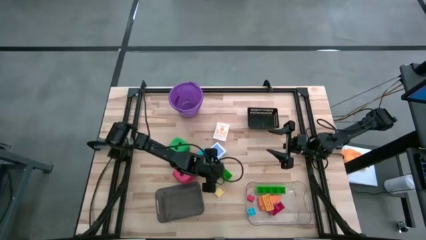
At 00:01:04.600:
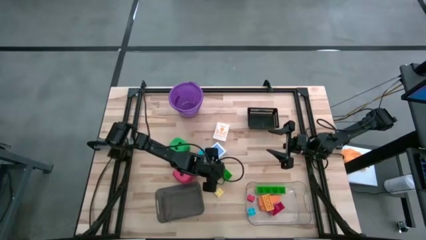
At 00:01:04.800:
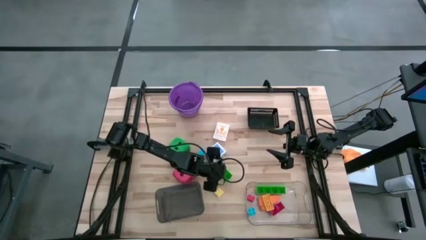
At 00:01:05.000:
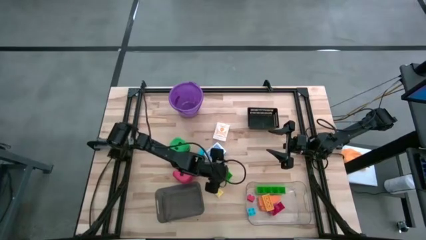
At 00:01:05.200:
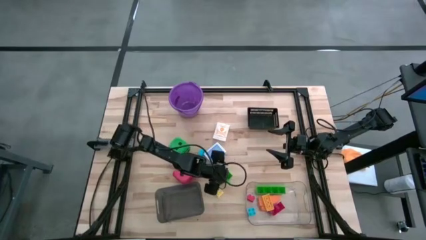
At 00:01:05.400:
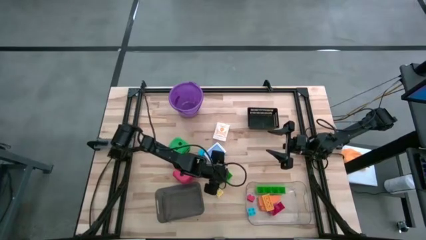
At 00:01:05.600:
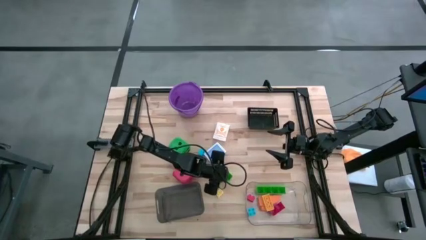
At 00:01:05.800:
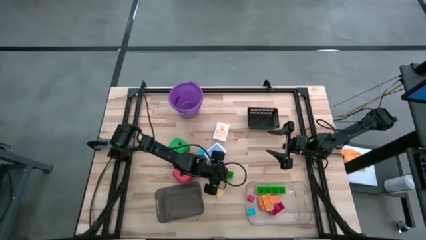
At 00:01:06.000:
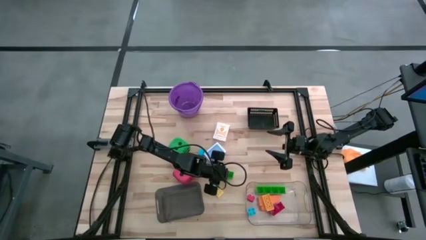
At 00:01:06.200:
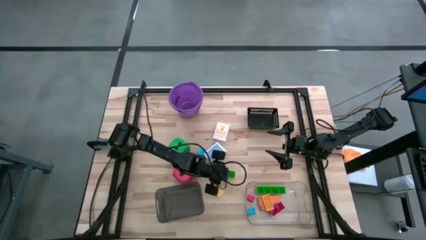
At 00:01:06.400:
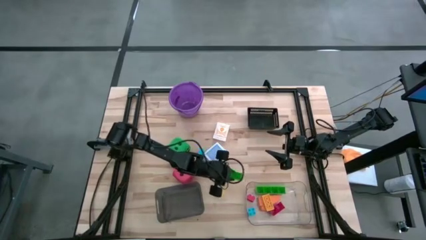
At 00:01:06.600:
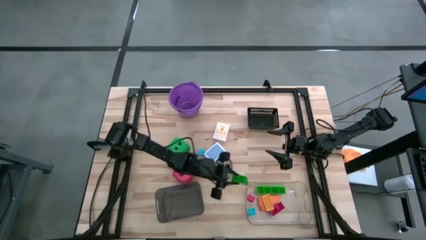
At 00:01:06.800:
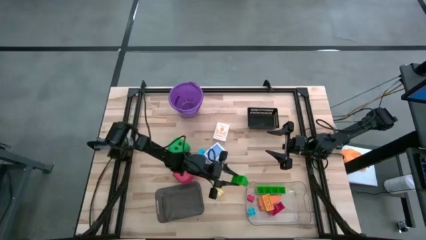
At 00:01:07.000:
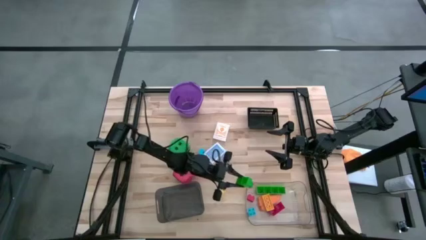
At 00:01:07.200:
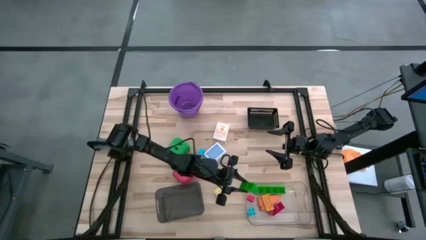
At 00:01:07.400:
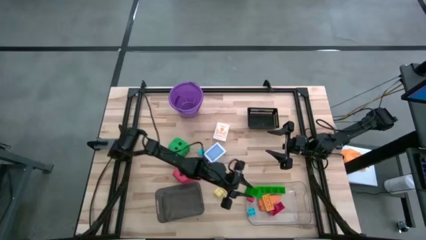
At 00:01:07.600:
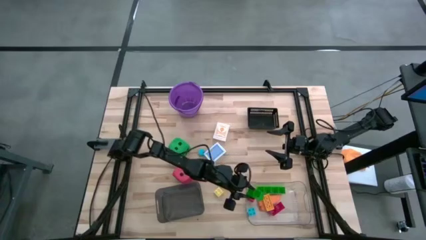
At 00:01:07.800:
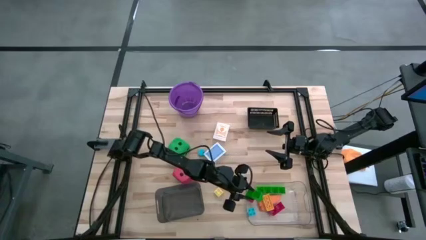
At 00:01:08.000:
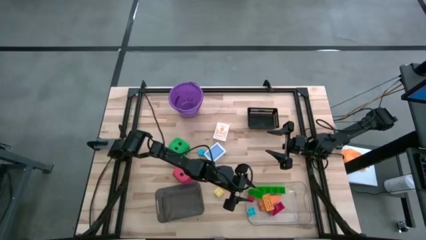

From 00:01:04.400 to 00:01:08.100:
Task: Pick & Place Toys
Put the large green game piece into the transparent bin

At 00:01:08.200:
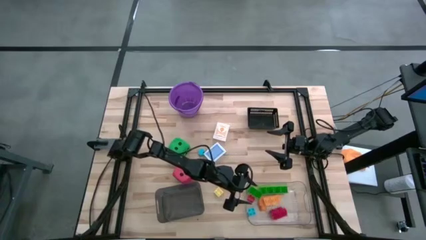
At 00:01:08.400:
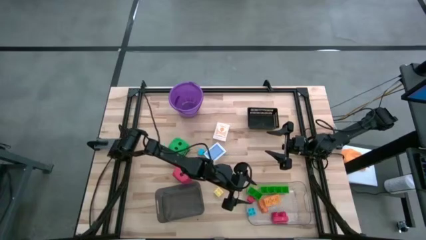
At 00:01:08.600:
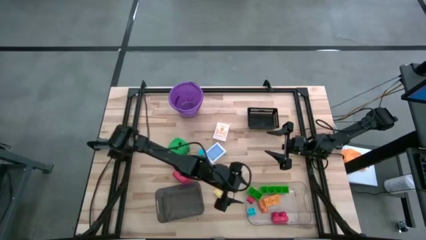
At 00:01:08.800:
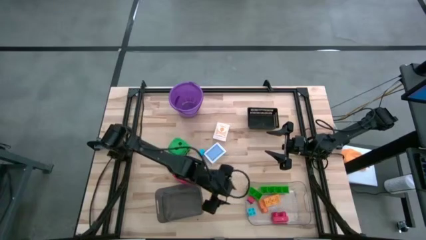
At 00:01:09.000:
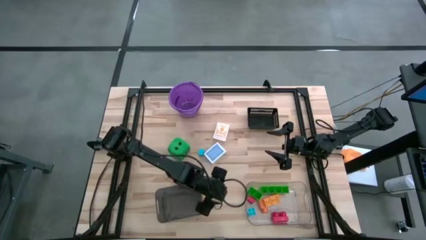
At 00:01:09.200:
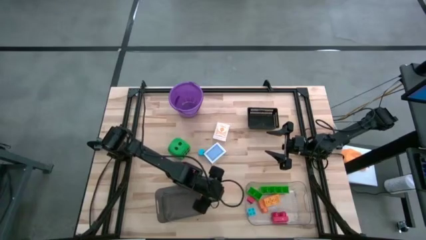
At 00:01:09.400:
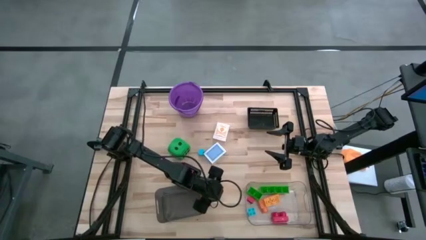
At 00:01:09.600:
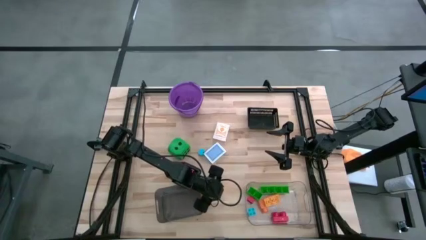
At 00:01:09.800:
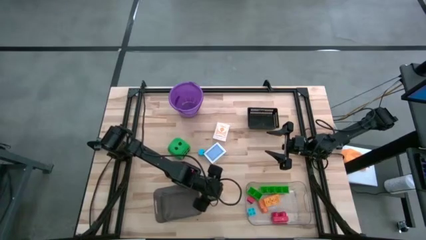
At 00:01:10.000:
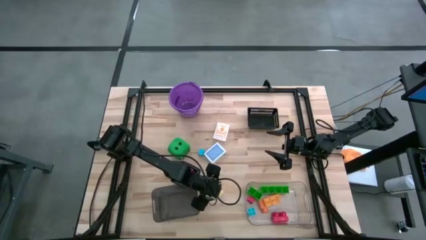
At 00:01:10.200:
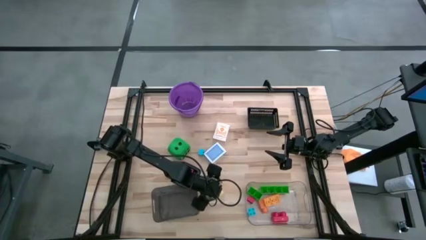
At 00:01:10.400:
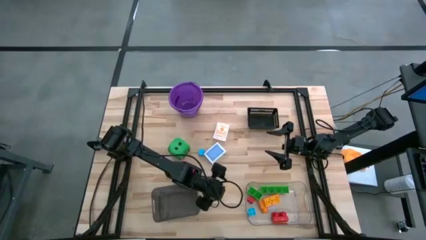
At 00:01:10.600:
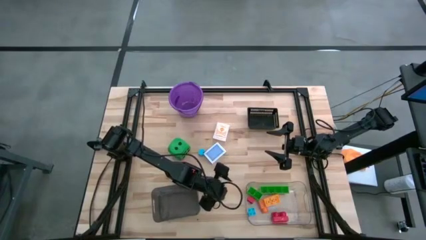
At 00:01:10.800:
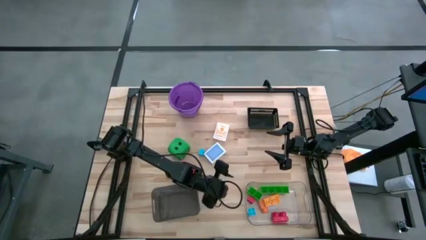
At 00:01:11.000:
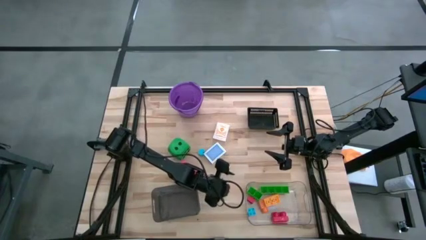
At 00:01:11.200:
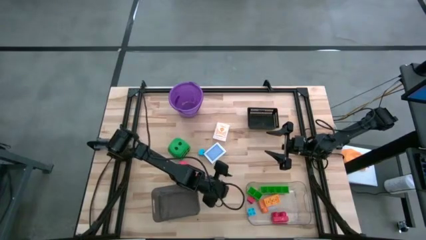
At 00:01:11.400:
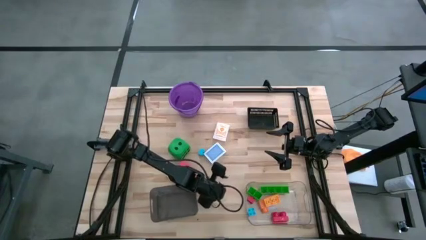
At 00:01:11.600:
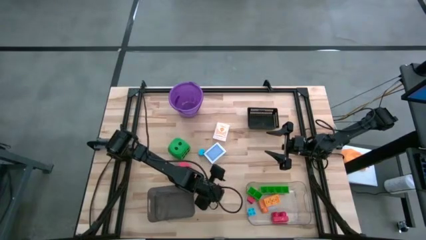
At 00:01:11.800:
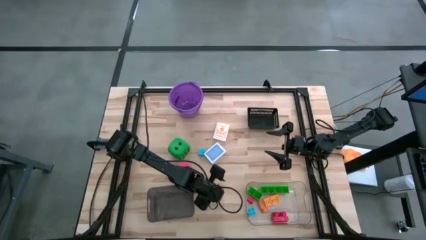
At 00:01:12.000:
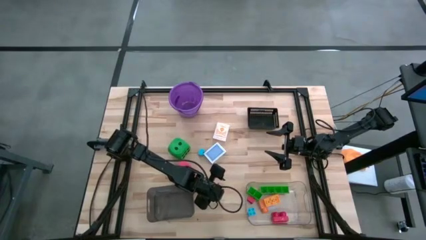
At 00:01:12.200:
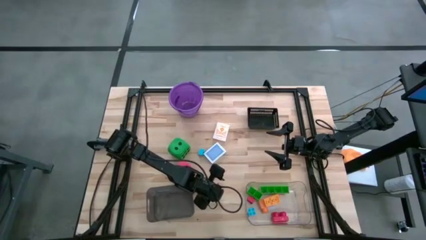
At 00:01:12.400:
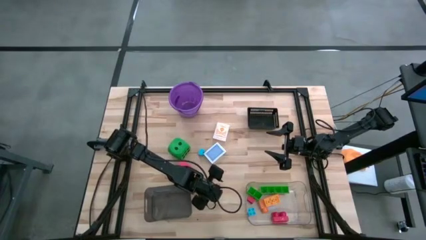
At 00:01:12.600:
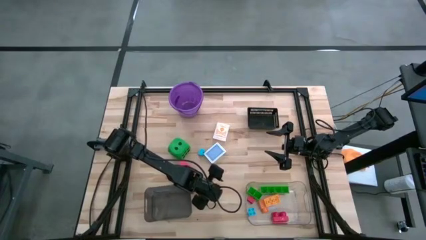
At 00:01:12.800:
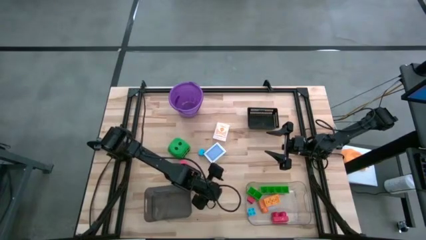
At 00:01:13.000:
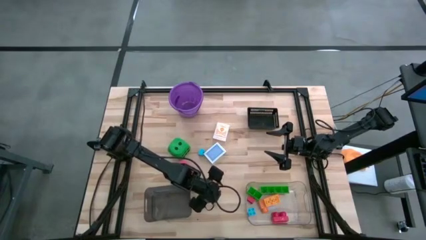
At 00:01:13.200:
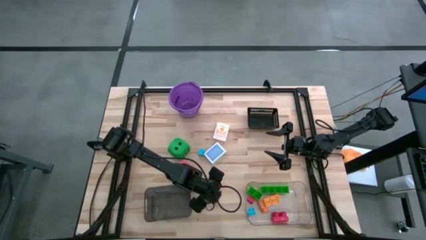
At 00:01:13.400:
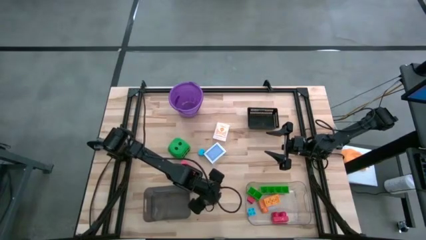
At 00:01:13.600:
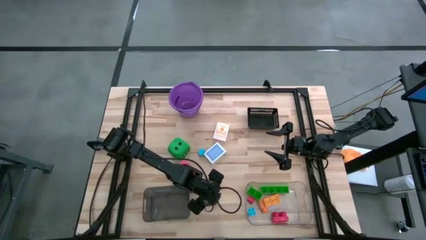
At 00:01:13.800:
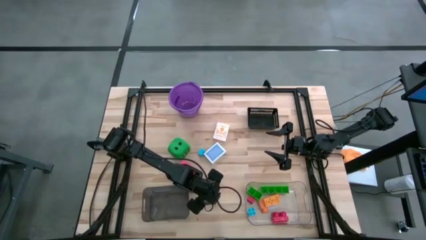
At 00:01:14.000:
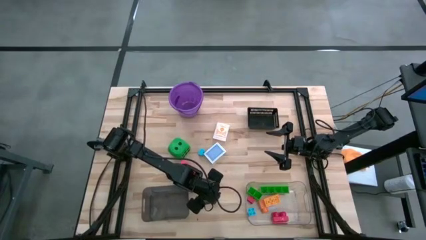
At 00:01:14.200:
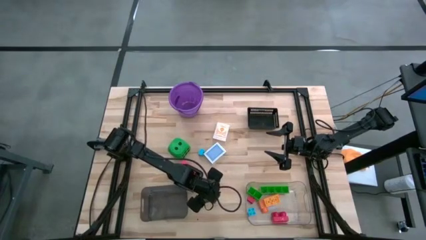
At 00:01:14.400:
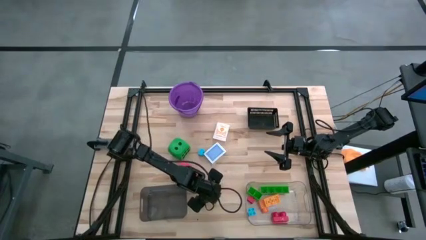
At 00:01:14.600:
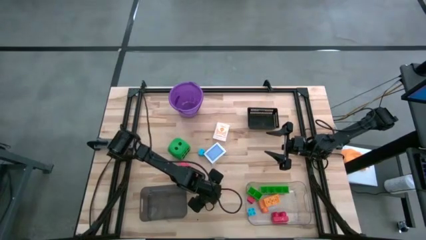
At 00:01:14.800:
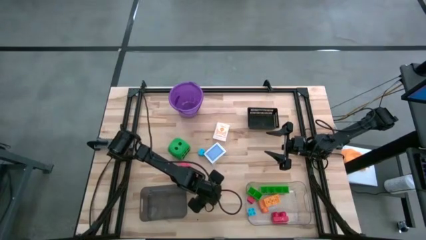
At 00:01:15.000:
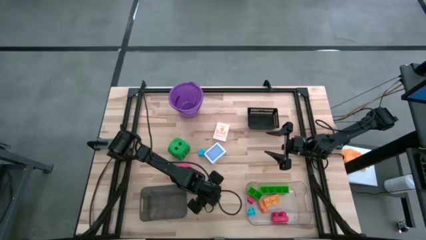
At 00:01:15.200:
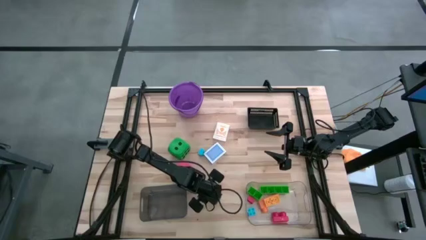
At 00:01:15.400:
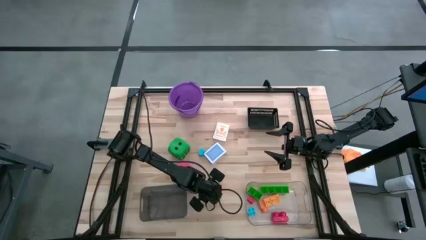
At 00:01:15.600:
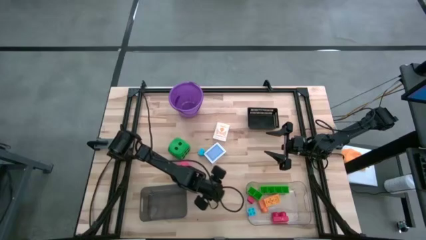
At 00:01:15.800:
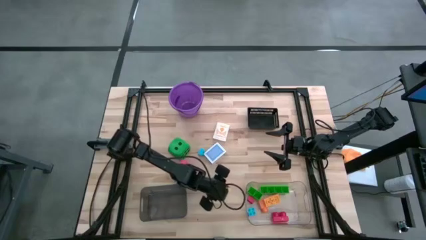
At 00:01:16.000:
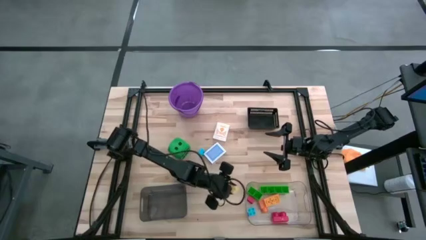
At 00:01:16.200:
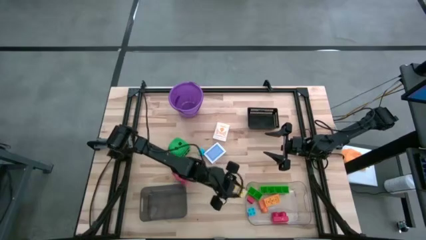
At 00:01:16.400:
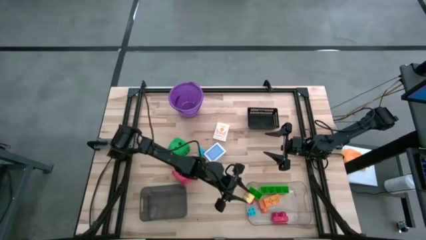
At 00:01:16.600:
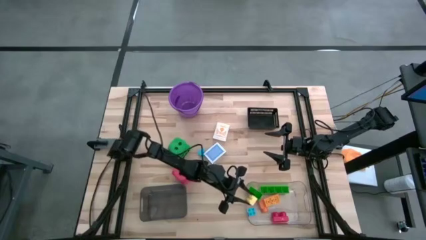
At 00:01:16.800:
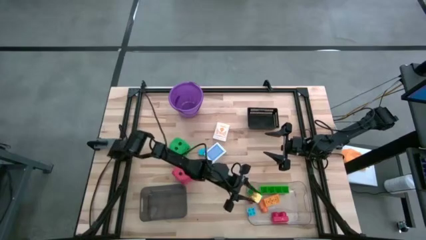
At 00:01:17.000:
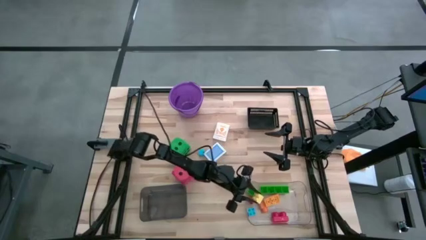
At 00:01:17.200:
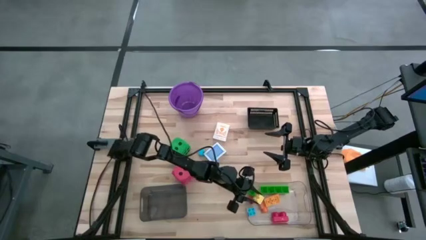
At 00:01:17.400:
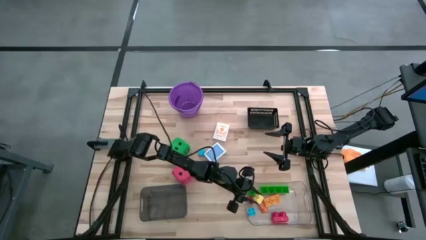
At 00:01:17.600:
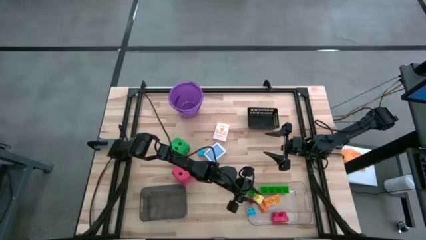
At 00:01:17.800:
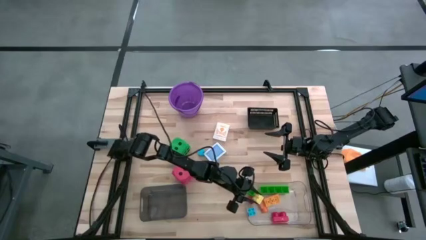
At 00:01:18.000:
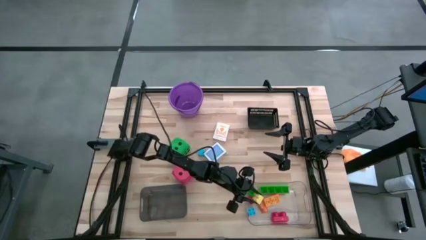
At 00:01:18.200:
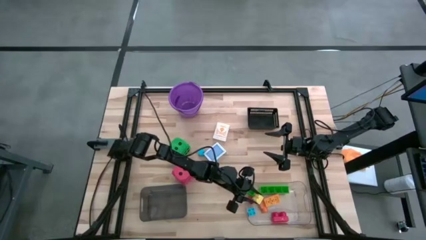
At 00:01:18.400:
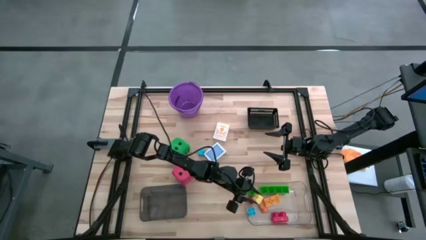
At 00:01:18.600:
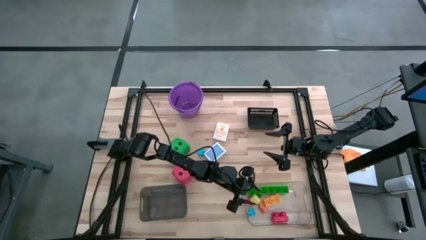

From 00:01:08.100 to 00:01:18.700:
Put the small light yellow game piece into the transparent bin

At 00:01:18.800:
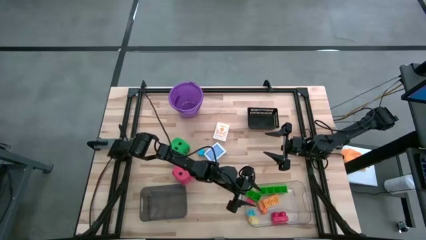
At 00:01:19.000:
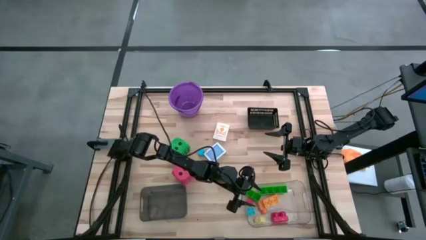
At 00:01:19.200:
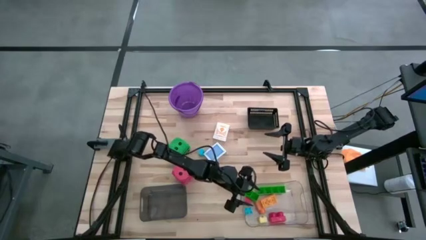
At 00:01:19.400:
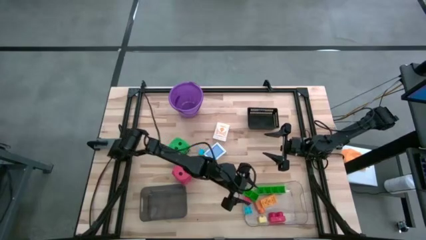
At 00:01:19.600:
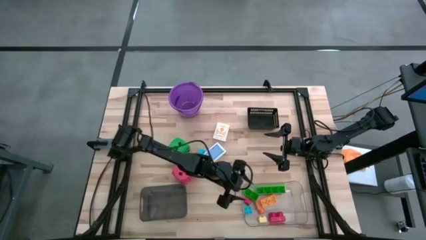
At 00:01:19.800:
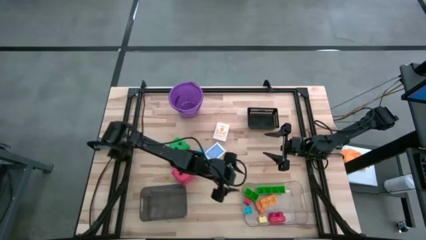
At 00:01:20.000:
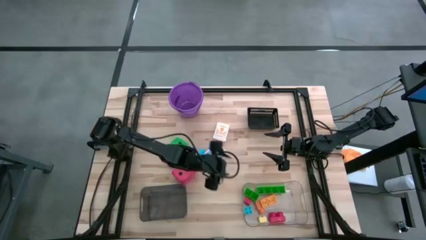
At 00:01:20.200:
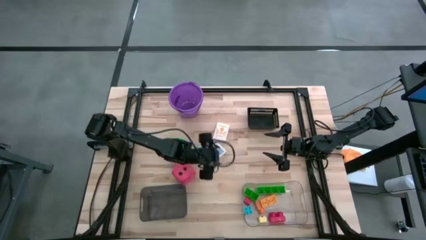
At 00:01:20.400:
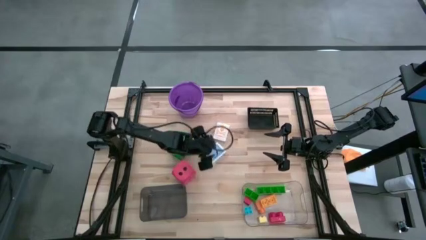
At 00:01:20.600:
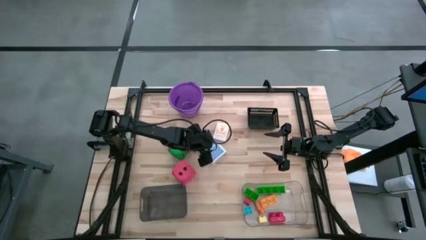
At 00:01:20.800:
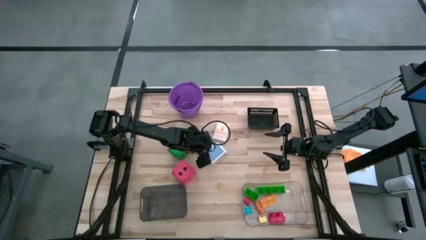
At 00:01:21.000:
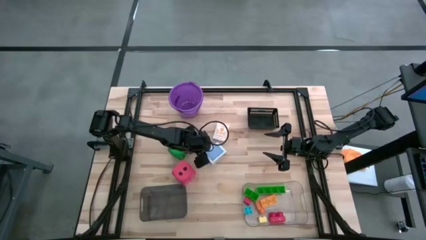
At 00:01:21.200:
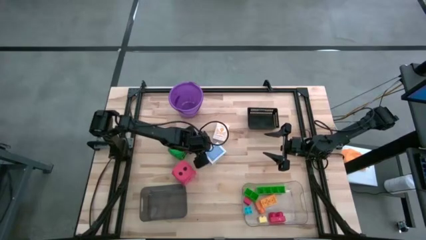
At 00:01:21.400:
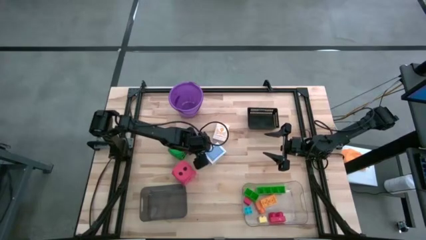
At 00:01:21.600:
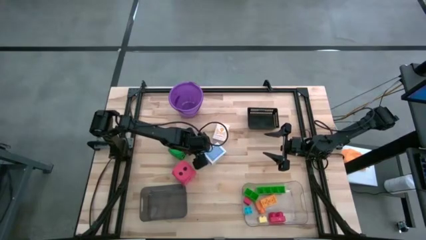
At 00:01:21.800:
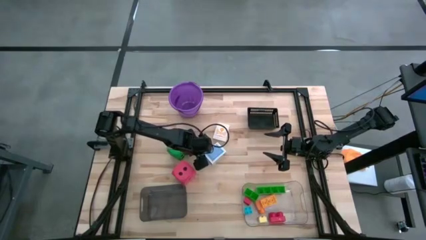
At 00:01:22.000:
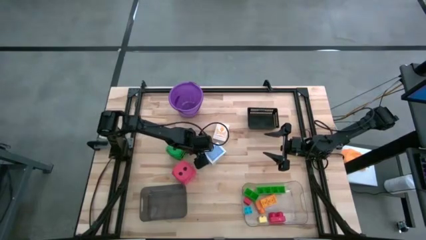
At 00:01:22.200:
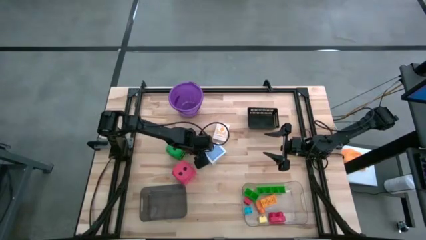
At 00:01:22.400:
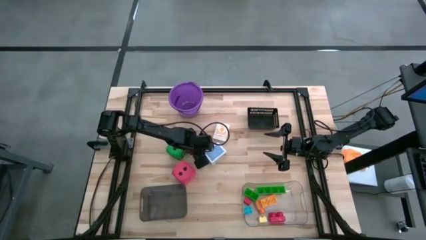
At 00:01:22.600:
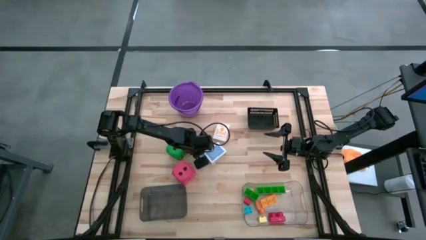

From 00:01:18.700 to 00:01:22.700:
Put the small blue game piece into the transparent bin
